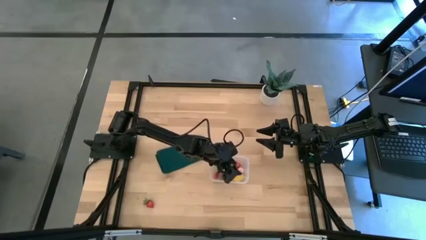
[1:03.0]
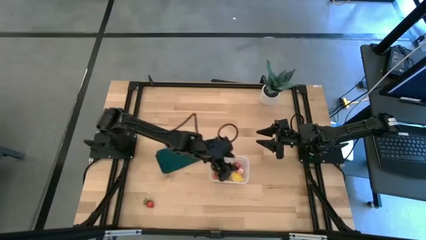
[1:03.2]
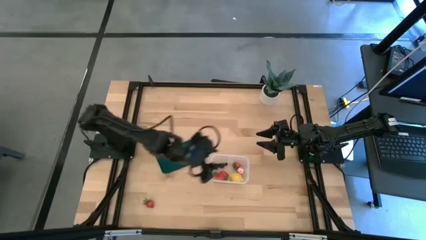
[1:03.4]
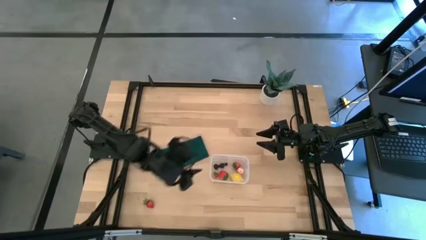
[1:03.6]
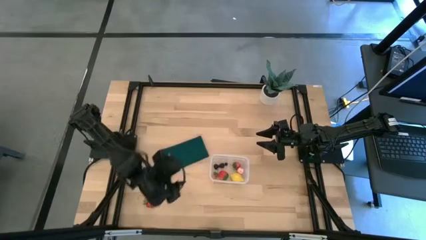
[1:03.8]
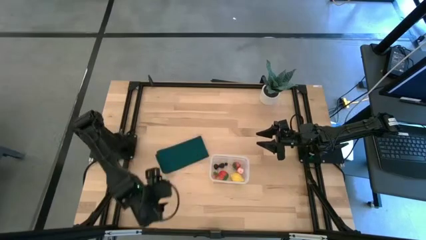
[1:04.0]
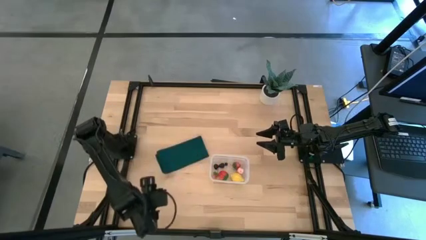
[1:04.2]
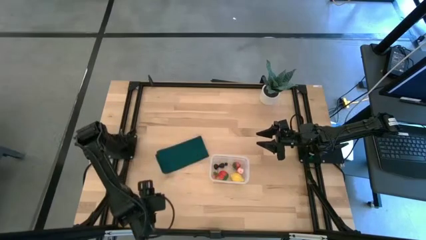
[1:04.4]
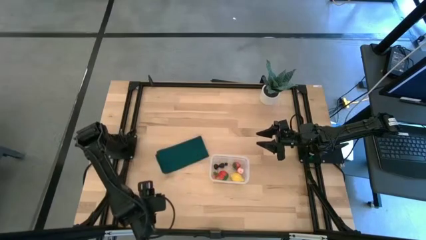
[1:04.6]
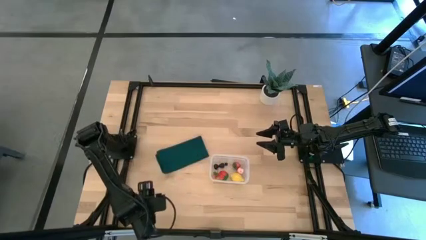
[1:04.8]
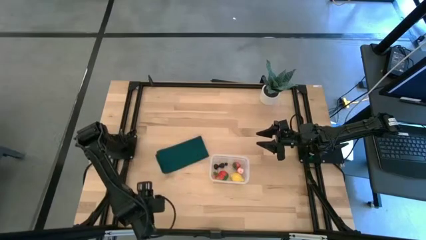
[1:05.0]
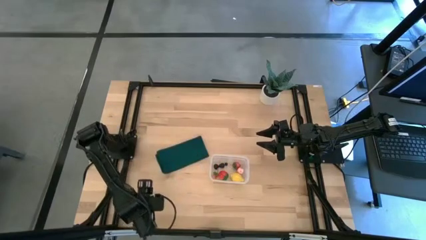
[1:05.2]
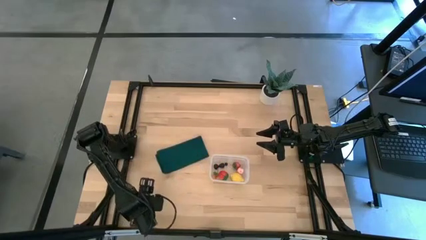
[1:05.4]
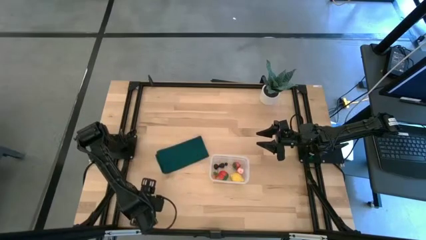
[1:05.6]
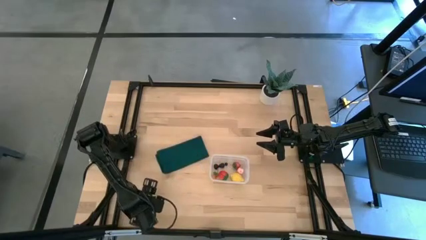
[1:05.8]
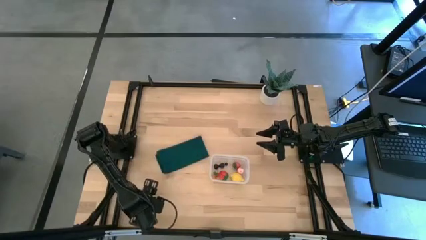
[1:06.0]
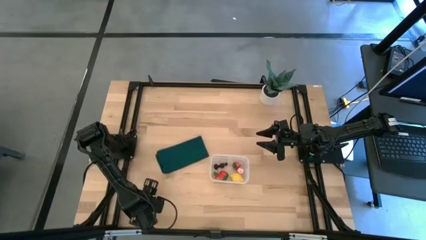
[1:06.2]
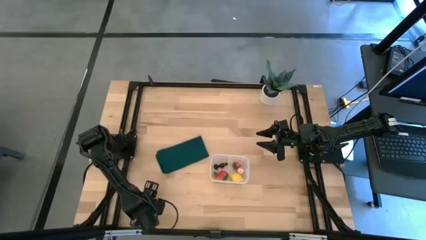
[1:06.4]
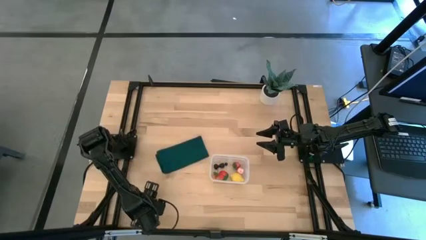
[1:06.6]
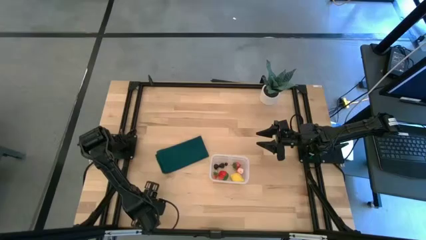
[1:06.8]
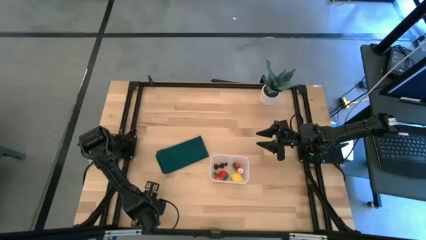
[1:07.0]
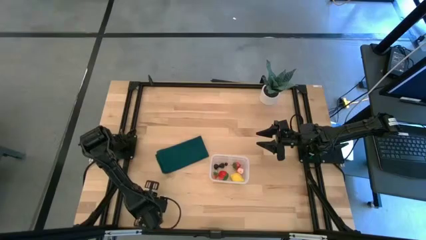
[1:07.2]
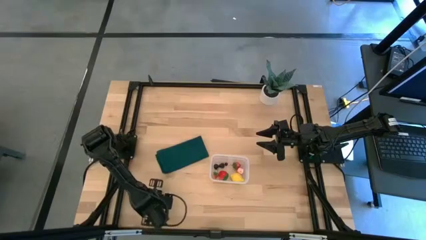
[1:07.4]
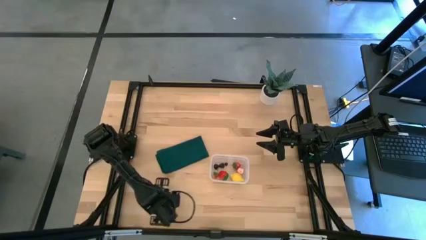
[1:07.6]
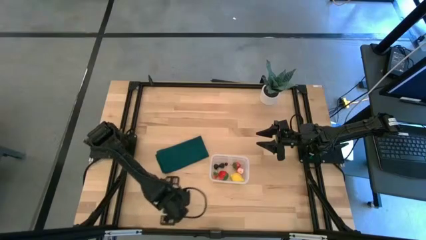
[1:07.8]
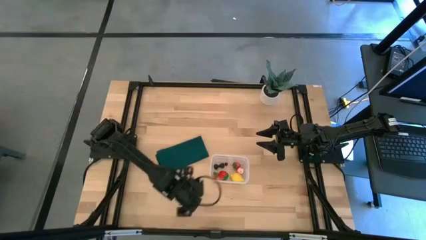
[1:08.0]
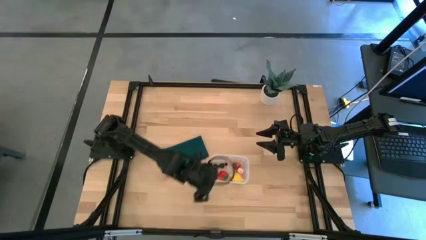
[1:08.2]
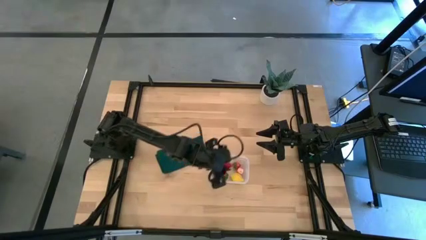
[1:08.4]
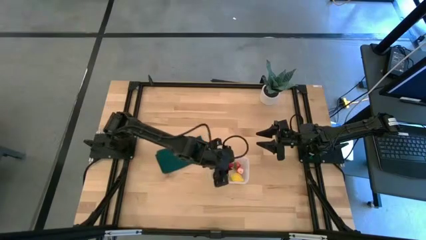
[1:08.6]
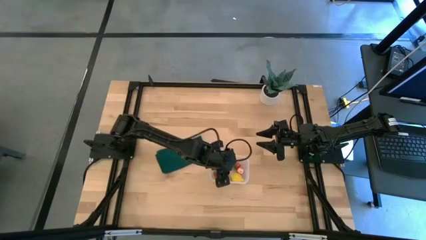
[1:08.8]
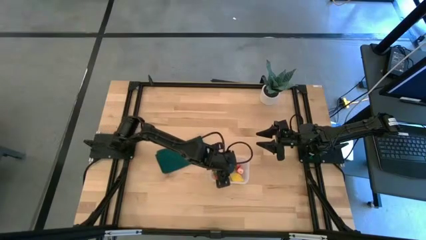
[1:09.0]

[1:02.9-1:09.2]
Task: Pick and placing Produce into tupperware
Put the strawberry into the transparent bin

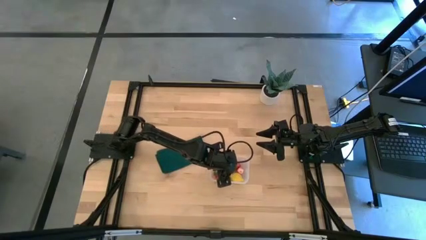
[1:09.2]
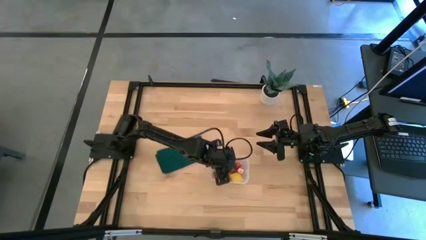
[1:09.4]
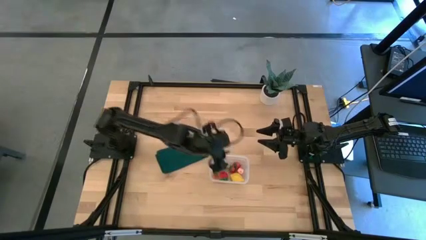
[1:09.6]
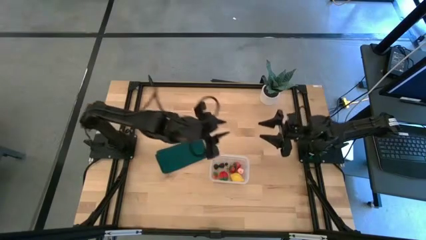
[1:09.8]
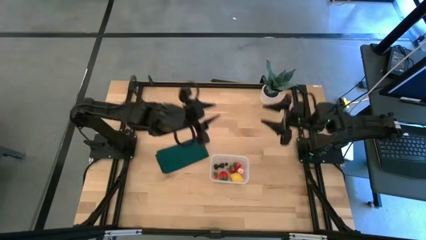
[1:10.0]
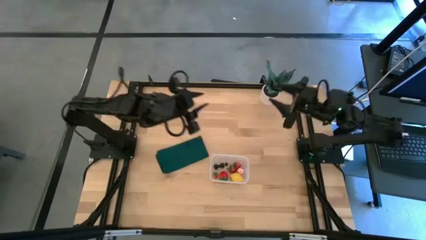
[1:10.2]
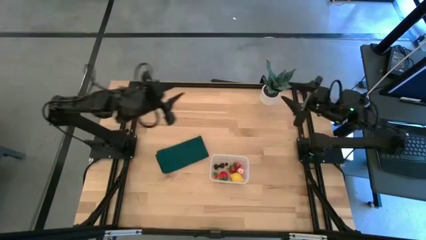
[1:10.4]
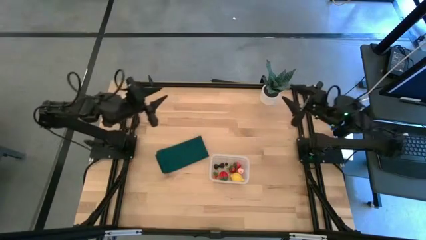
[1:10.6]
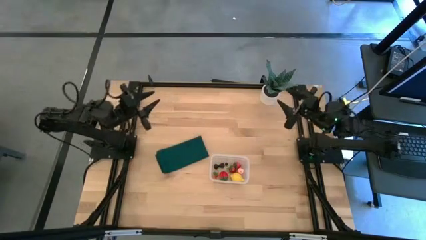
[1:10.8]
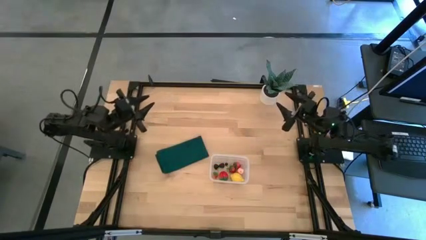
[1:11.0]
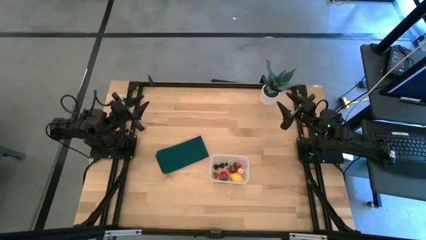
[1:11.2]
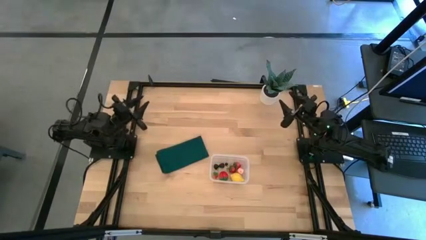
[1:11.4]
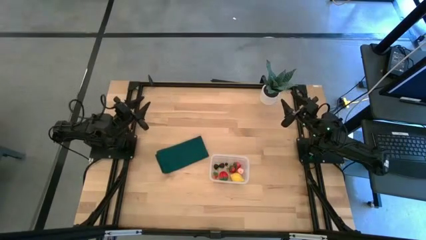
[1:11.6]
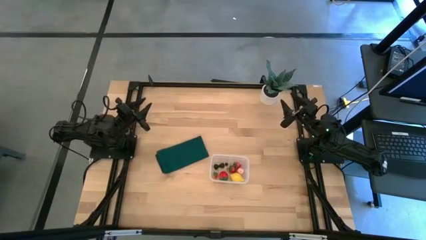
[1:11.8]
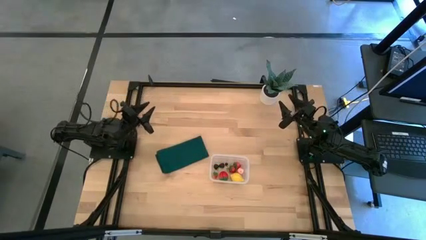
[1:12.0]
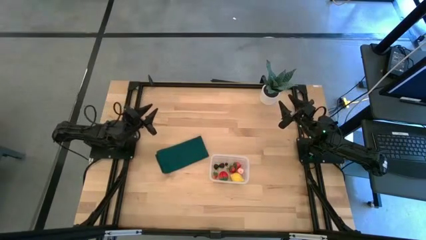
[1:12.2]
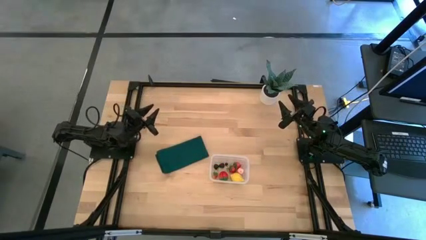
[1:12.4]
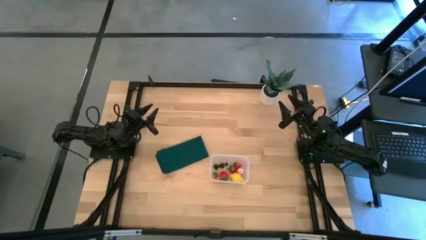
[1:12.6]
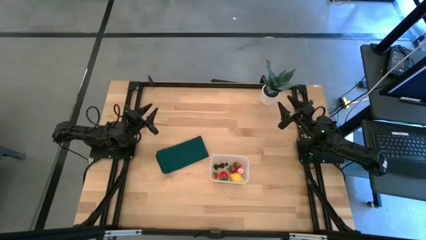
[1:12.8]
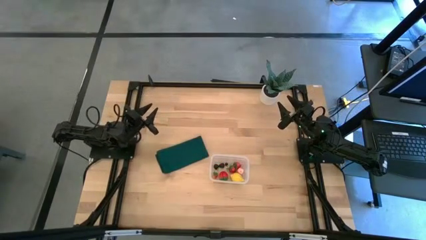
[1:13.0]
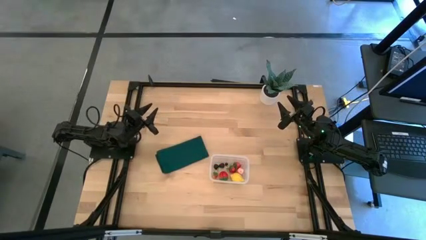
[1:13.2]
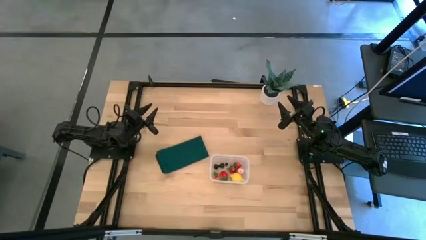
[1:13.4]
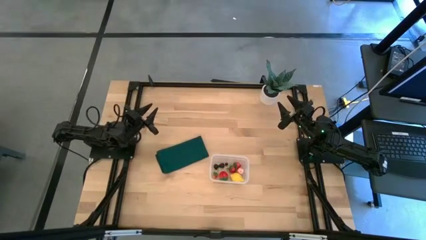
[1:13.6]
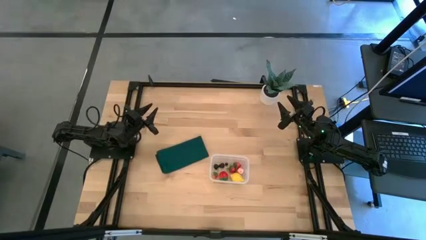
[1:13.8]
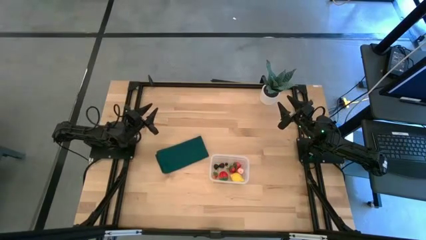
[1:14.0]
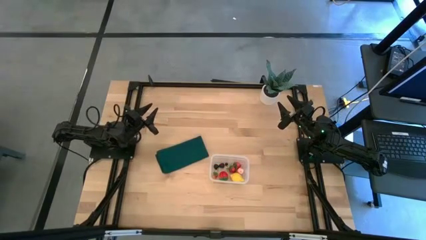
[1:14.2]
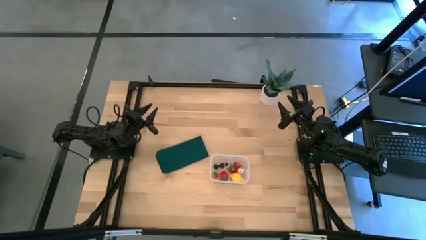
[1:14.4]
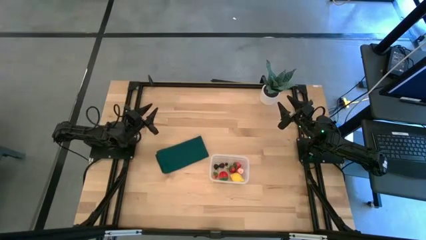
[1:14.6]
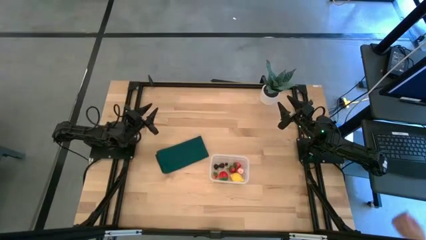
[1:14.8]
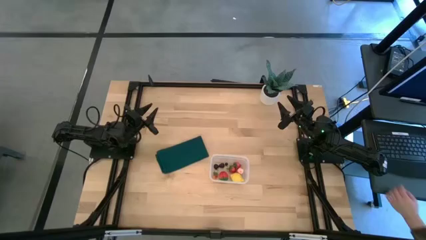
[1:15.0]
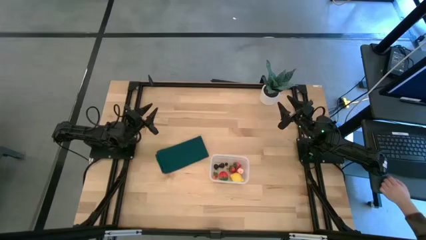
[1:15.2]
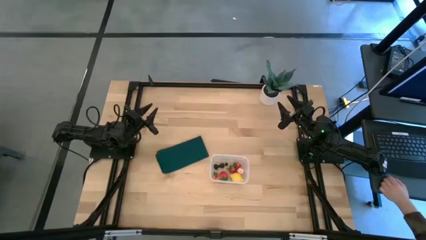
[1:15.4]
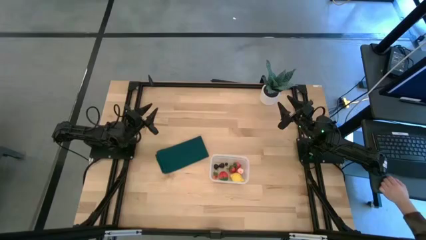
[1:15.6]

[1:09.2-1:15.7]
Return to Home Position

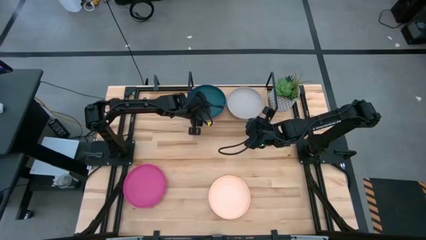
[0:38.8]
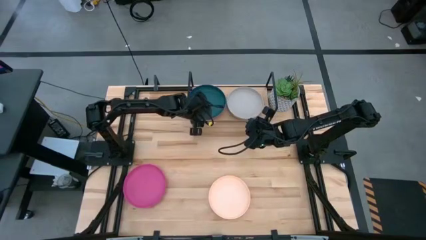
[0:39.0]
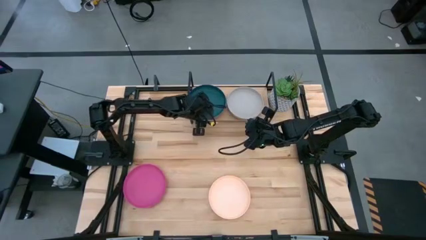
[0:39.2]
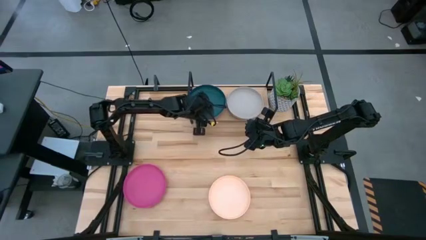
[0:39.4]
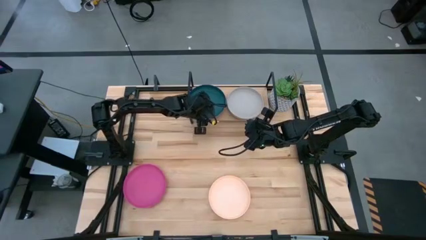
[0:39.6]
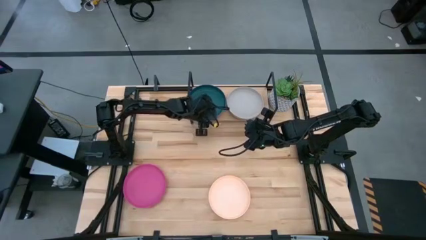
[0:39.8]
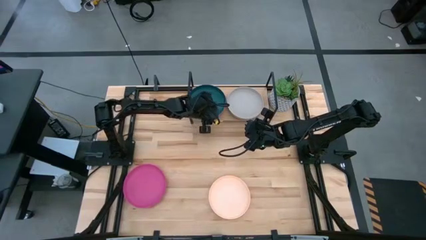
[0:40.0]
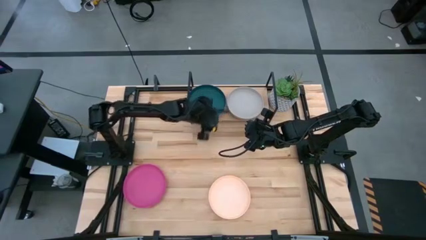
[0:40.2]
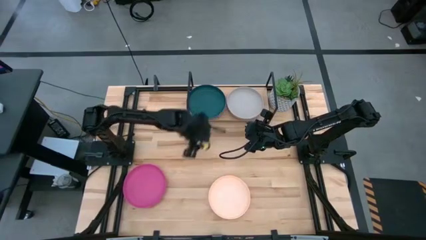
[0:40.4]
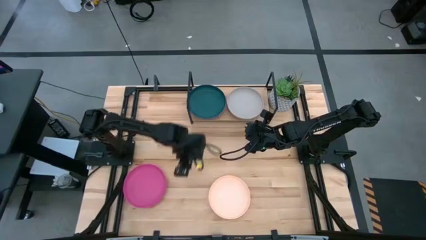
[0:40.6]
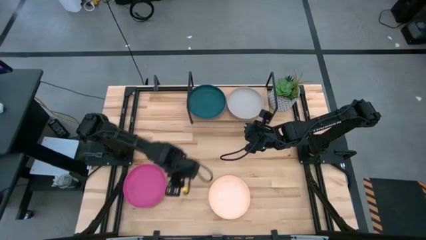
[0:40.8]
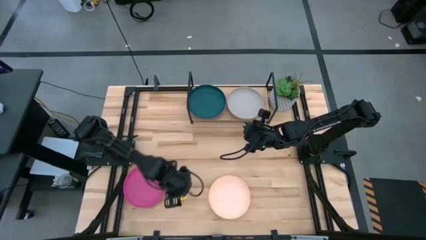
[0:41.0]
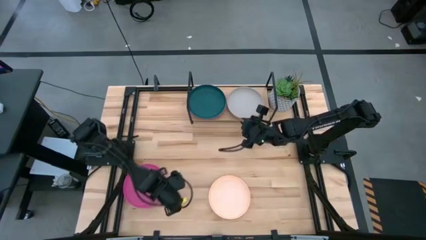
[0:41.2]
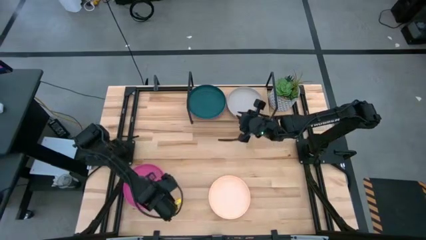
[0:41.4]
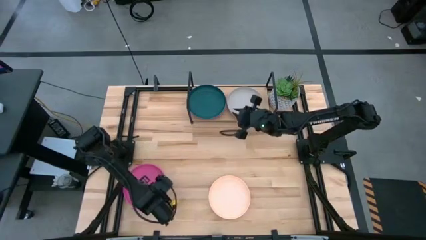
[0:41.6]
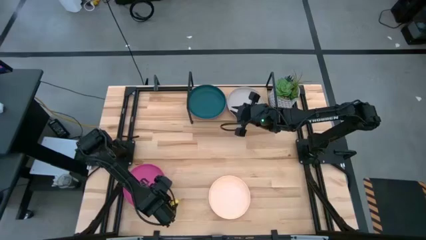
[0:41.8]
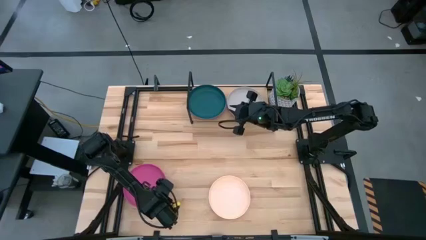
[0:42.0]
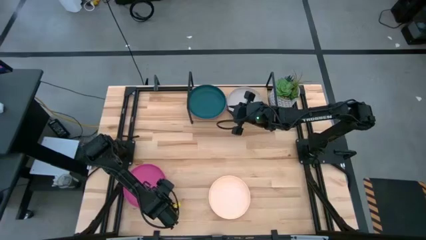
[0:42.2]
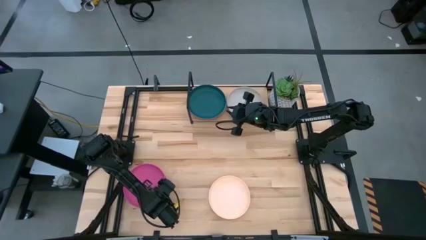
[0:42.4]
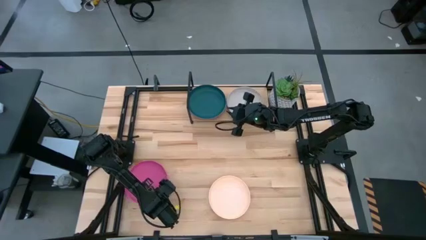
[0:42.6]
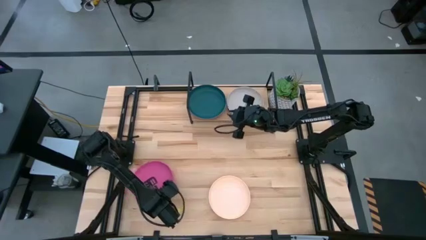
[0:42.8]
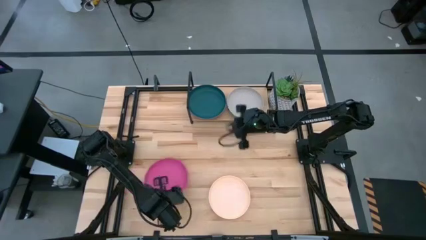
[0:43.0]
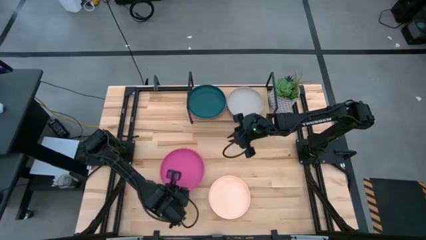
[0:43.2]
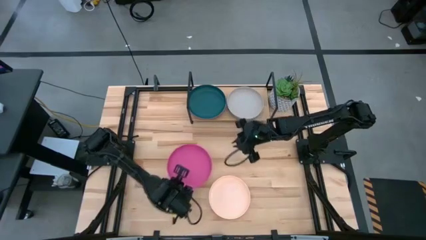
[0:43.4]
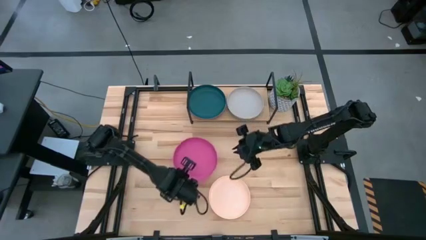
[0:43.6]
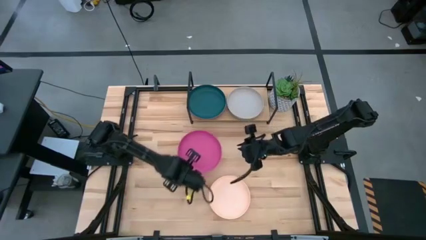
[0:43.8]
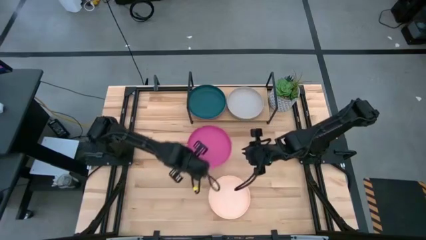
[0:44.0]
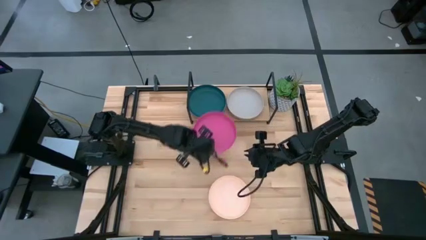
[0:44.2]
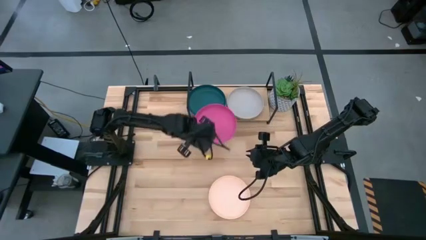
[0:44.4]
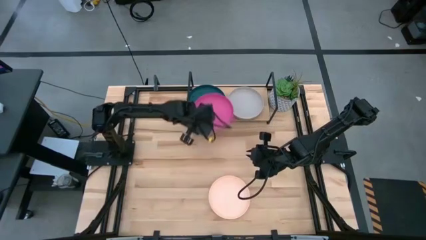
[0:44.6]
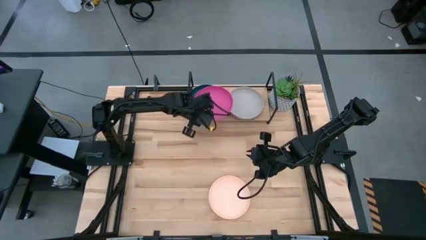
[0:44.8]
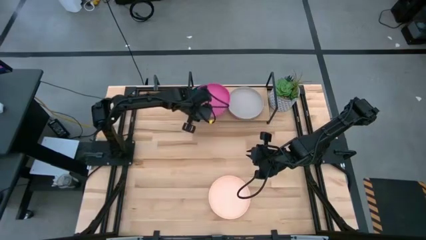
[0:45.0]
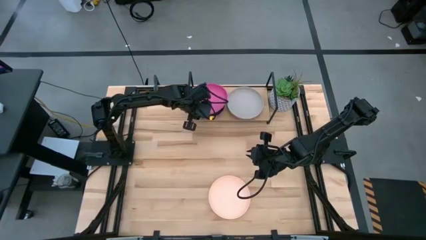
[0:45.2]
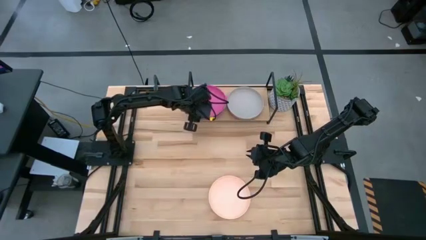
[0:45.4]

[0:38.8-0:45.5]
Task: Place and stack plates onto a shelf
Stack the pink plate on top of the green plate on the shelf
